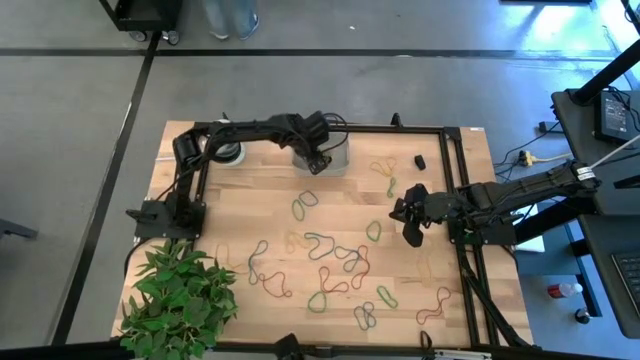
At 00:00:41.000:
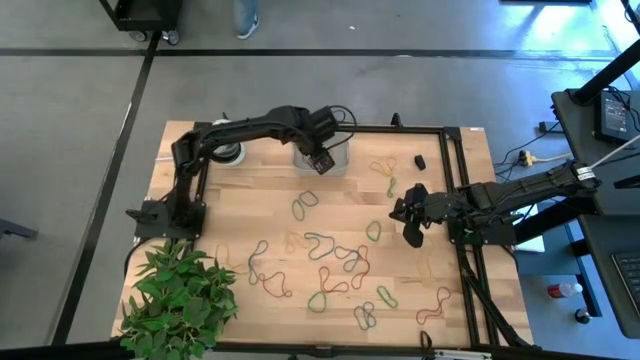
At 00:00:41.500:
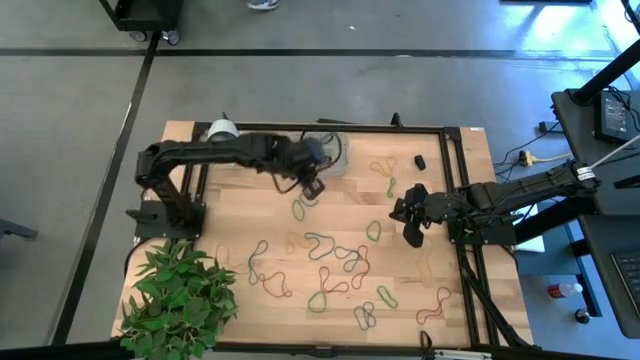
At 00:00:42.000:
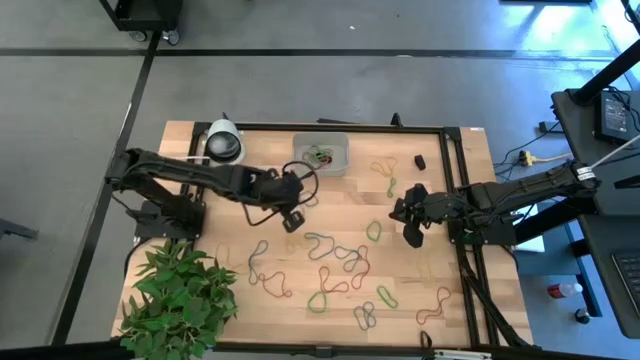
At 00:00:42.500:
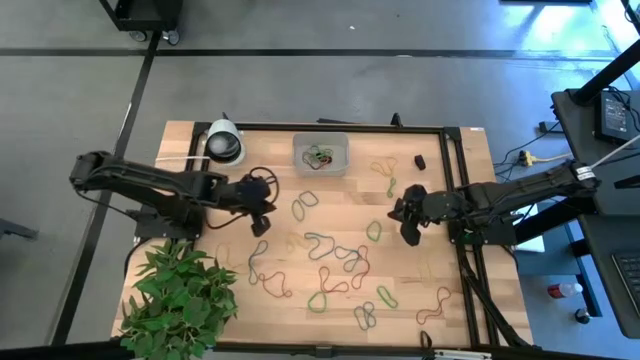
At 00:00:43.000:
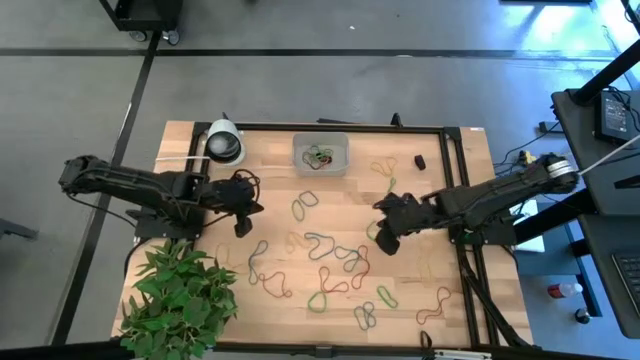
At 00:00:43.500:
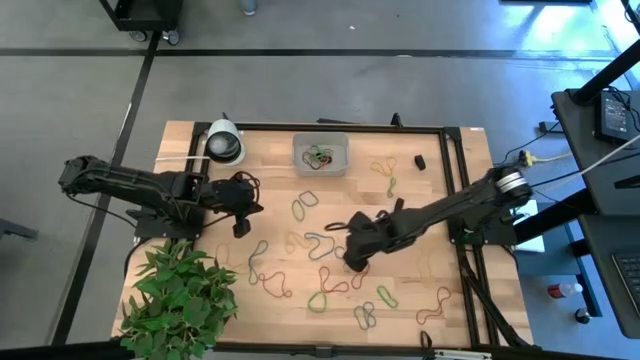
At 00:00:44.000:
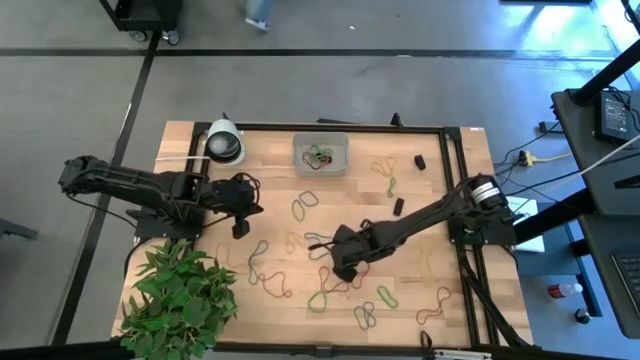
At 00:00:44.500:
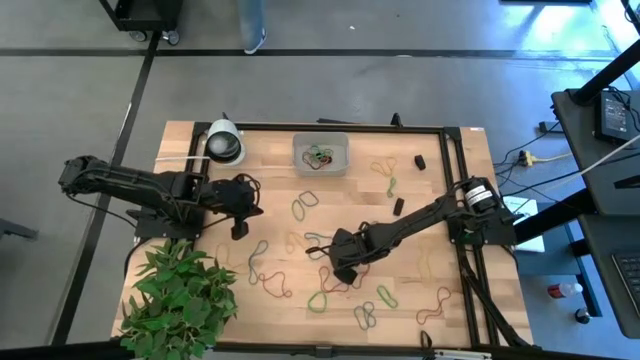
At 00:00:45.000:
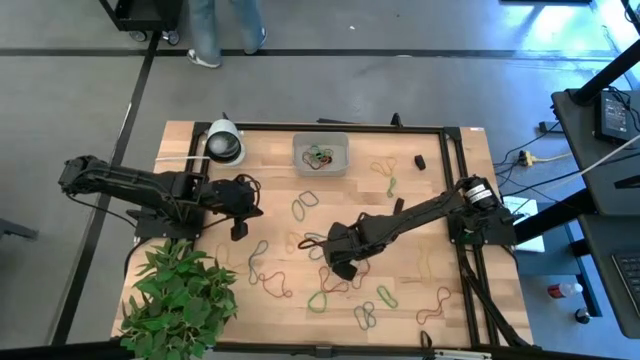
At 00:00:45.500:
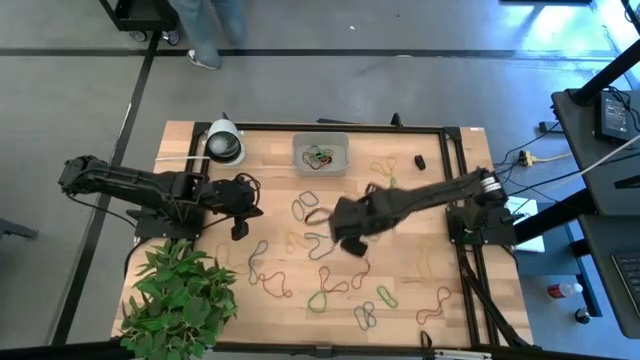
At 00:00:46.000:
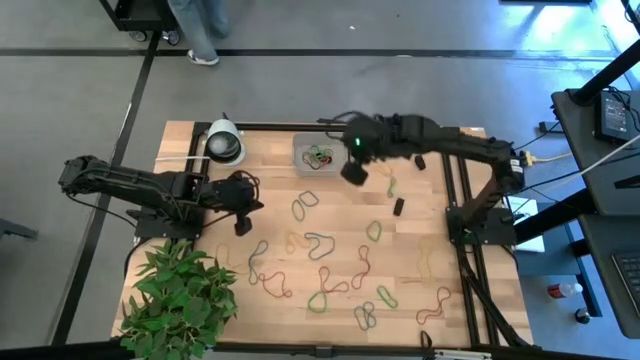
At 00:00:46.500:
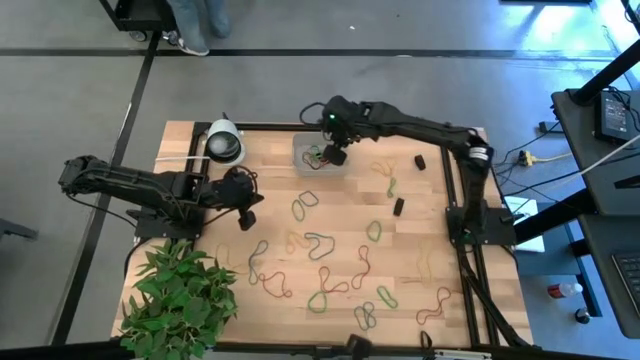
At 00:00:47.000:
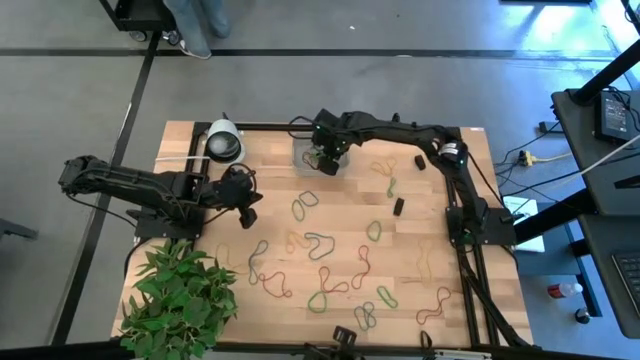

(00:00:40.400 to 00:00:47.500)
Task: Pick and place rubber bands into bin
Put the blue rubber band into the white bin

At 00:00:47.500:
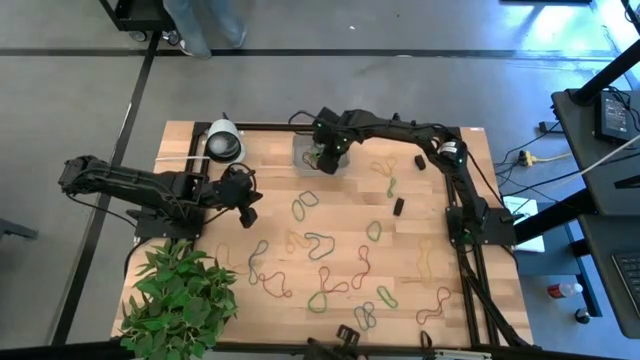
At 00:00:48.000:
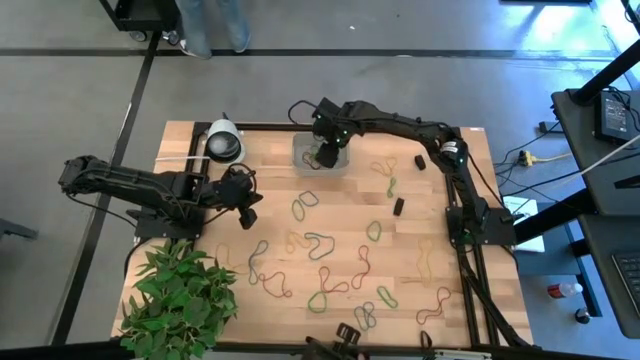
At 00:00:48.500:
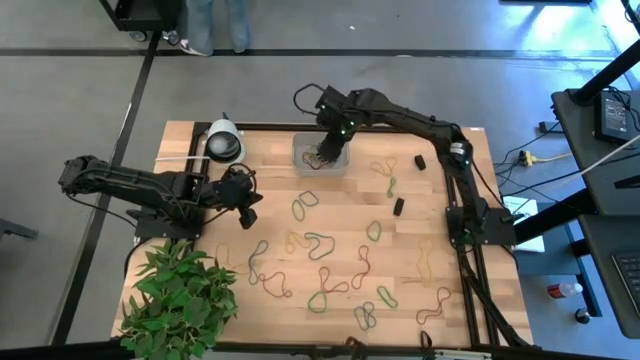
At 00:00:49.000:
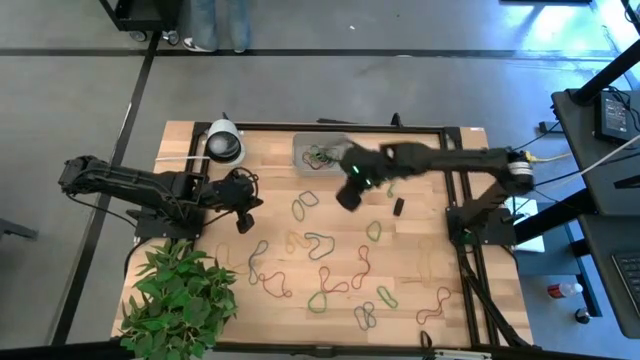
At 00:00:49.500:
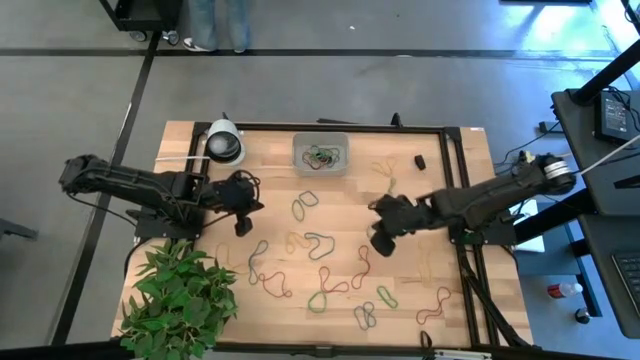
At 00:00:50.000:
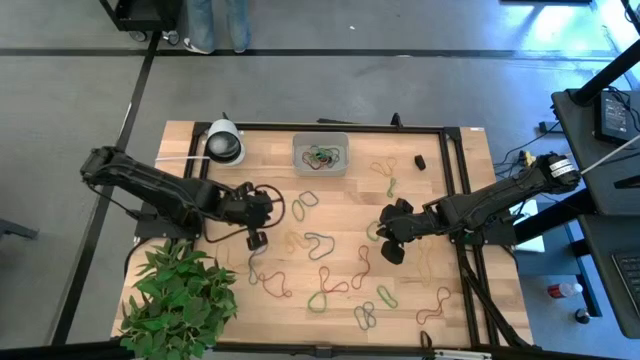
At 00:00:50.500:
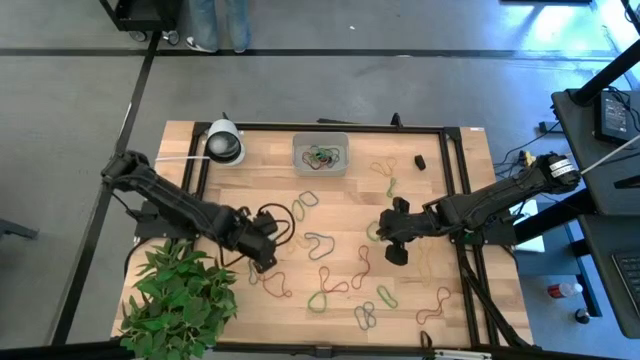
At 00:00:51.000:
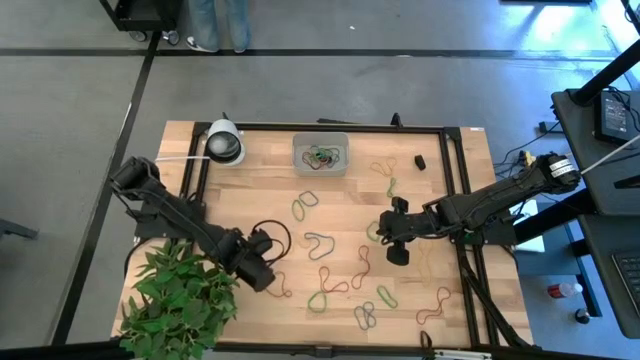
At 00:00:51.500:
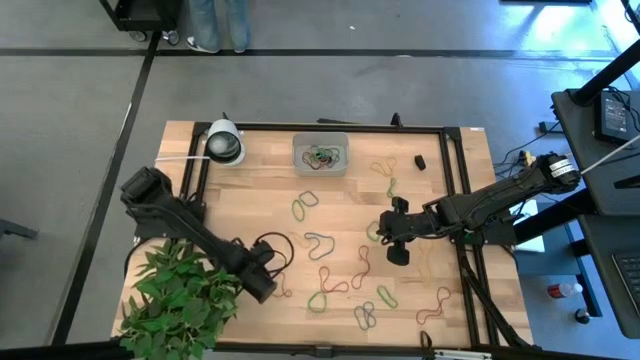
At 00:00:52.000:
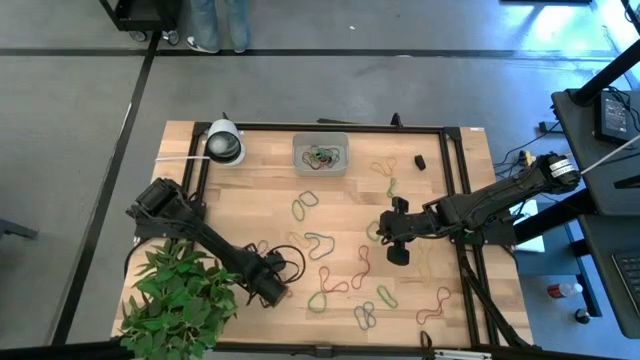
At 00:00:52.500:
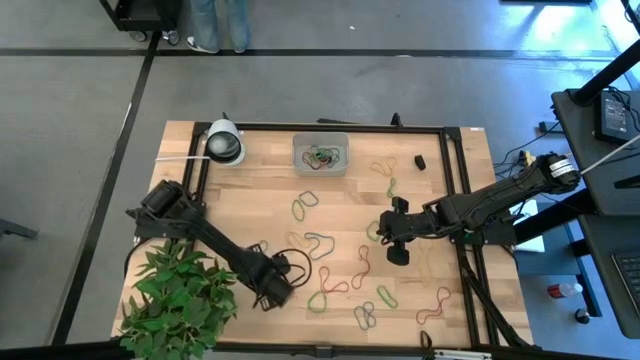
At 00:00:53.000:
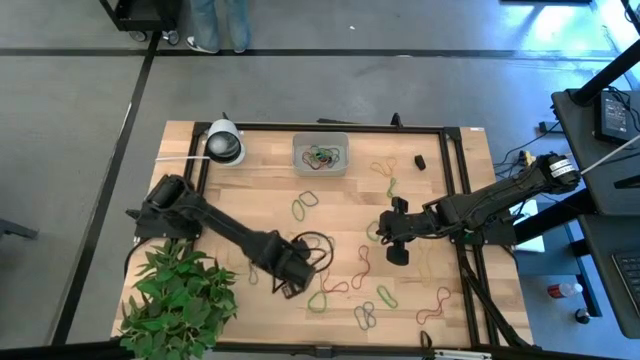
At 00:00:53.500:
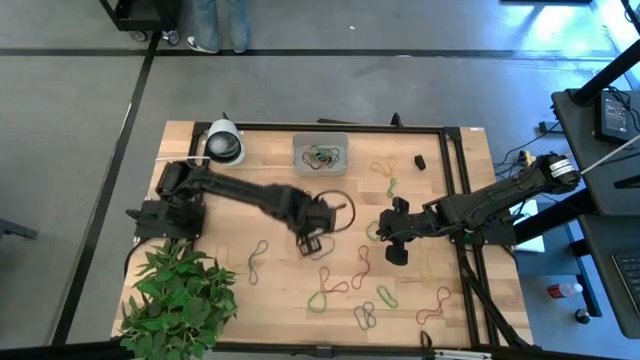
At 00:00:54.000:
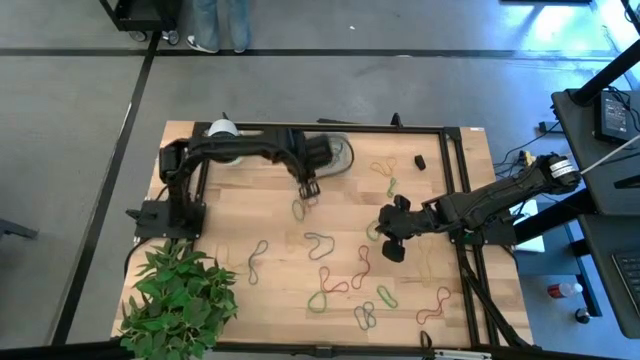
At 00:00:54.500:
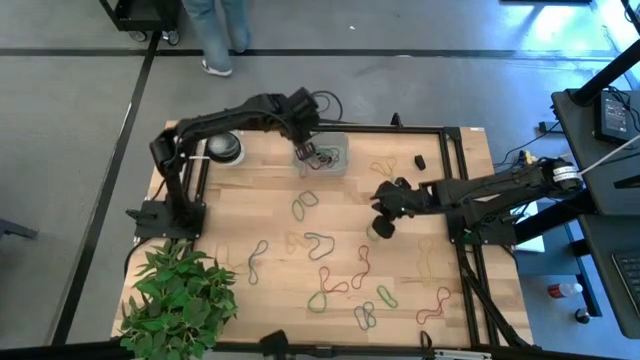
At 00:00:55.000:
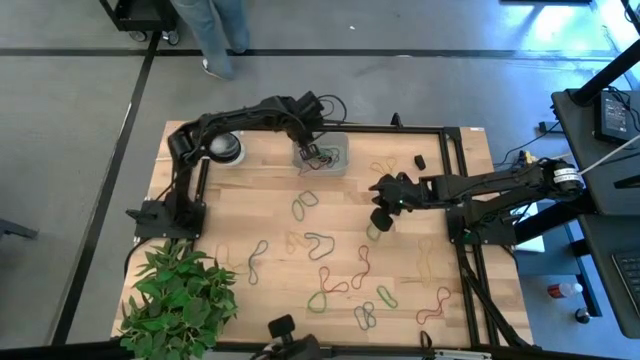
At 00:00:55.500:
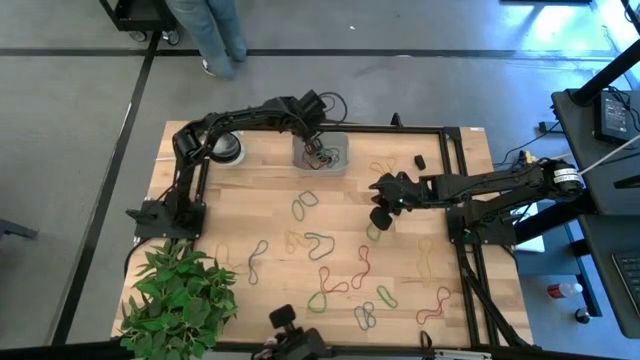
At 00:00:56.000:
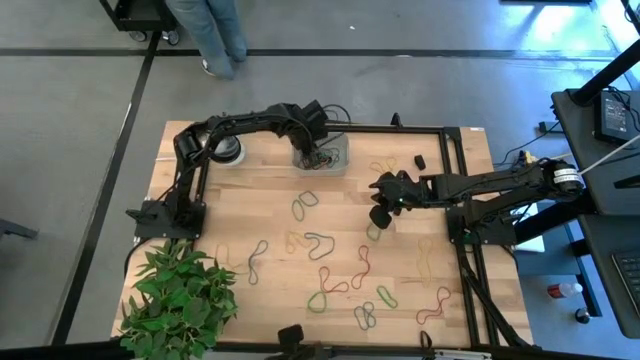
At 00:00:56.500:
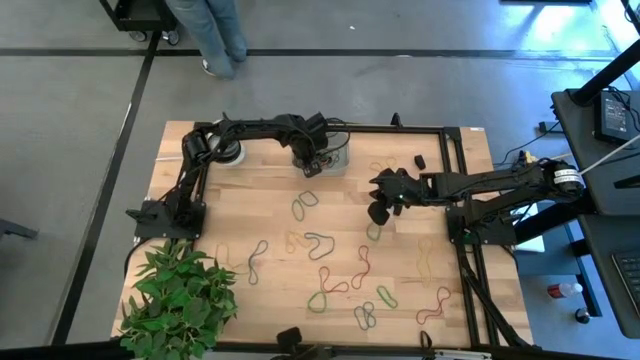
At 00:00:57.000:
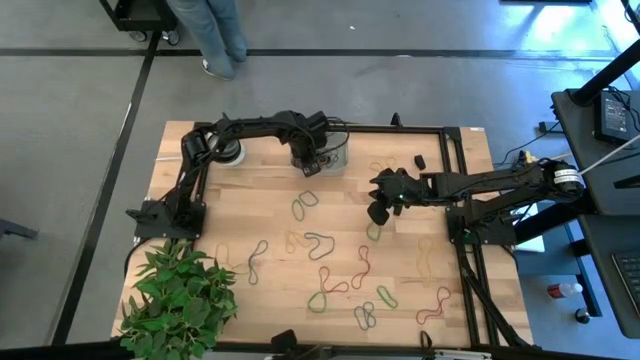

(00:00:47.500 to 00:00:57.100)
Put the red rubber band into the white bin

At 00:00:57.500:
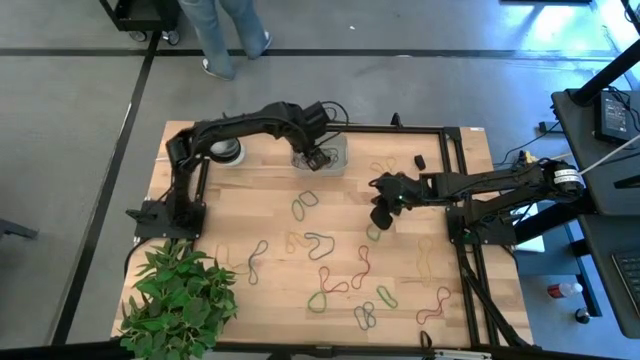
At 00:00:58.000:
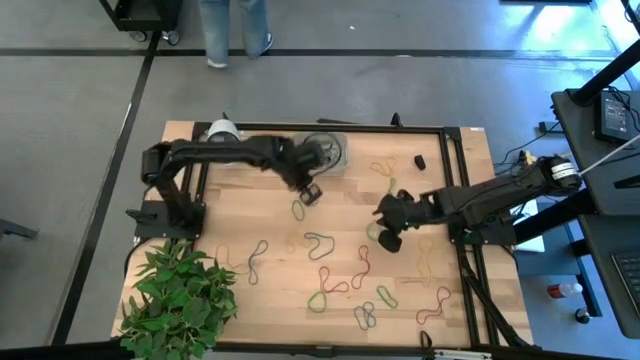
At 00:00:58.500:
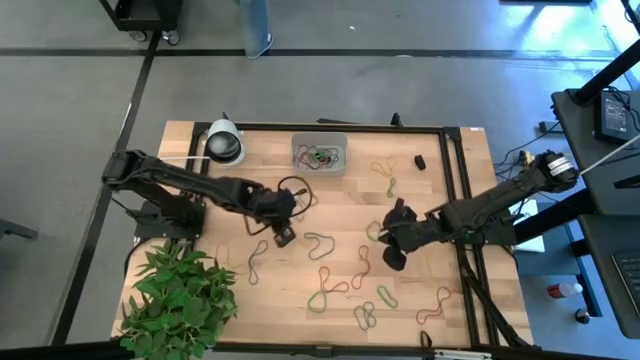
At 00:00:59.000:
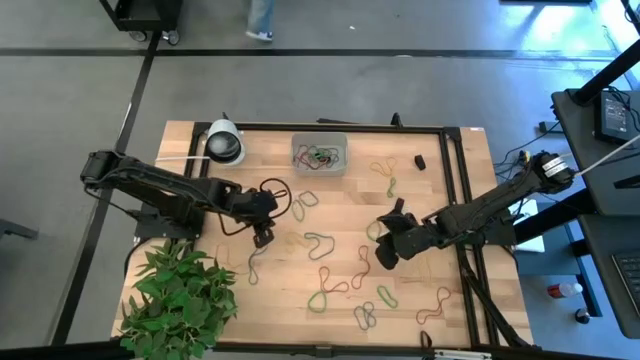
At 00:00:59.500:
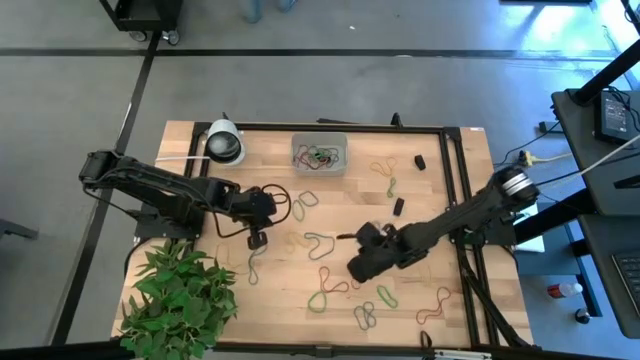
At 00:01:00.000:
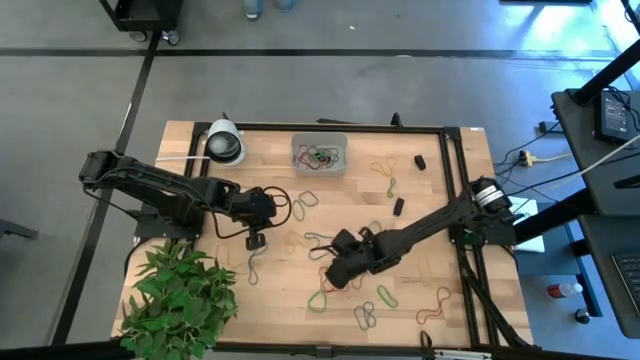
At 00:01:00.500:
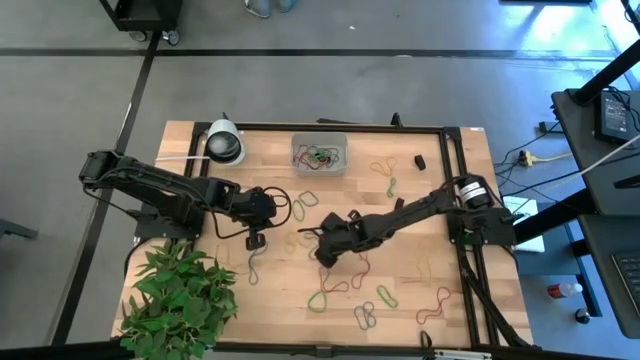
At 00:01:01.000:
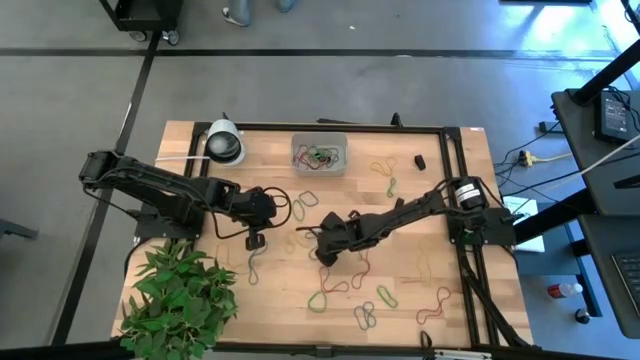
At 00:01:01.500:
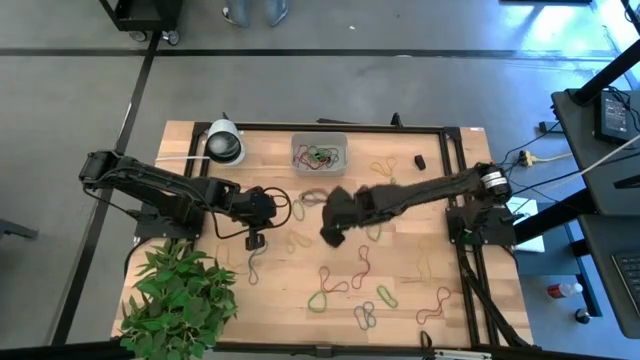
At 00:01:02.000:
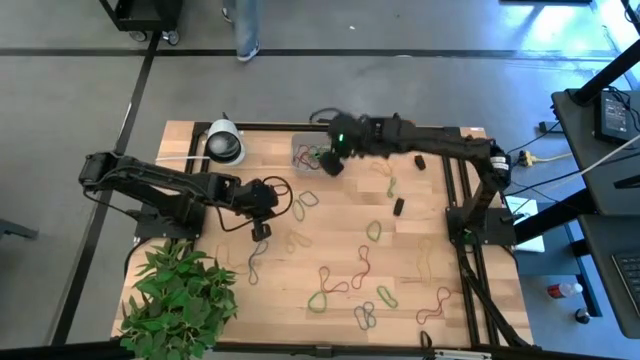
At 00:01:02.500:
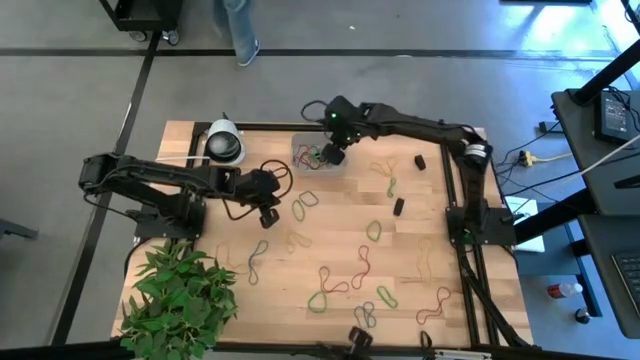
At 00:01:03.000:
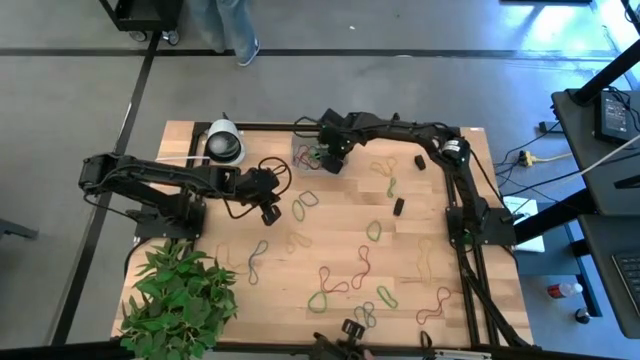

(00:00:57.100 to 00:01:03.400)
Put the blue rubber band into the white bin
